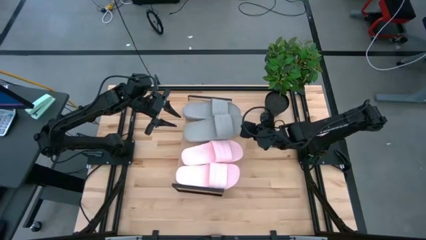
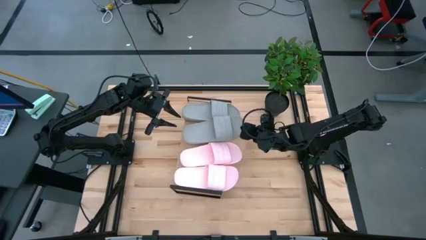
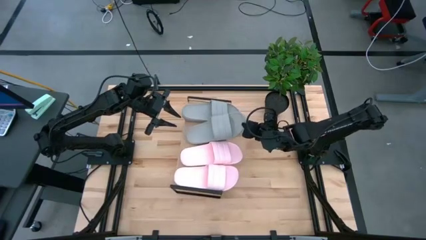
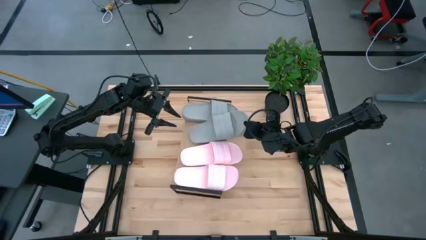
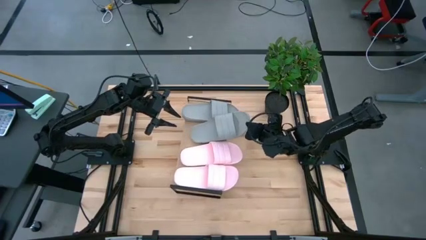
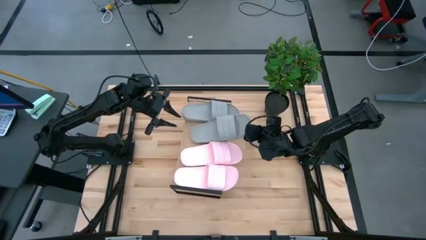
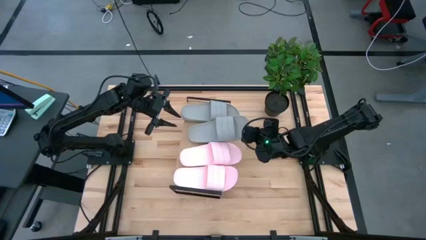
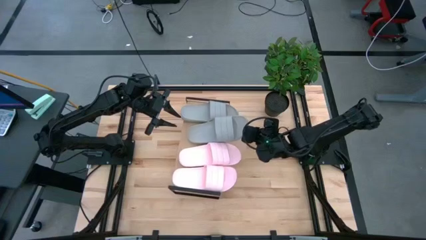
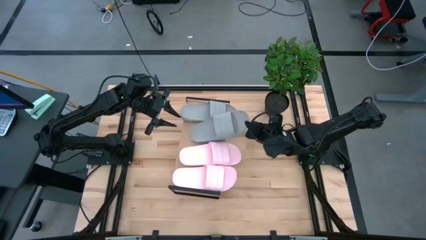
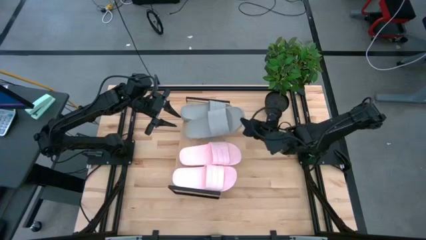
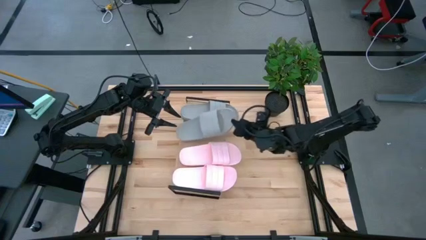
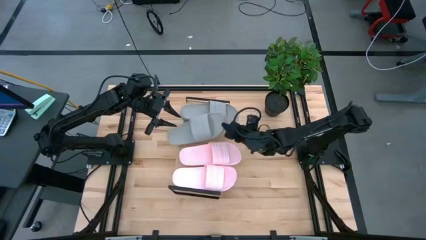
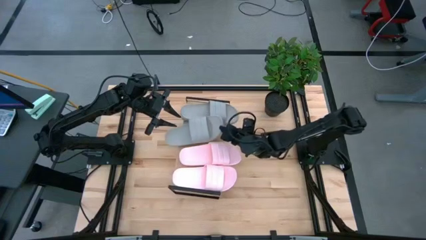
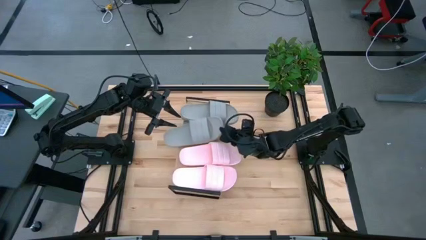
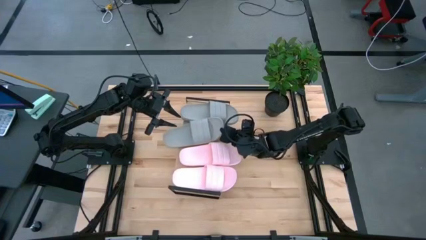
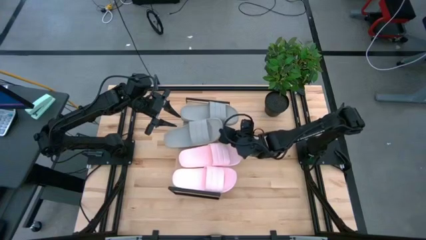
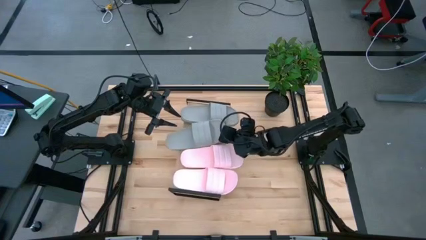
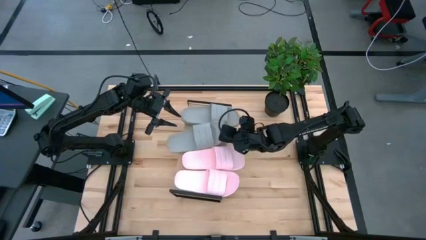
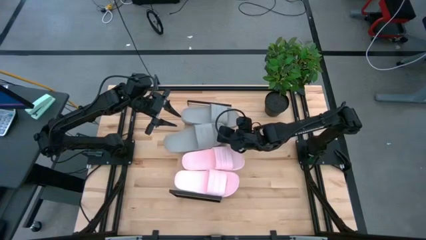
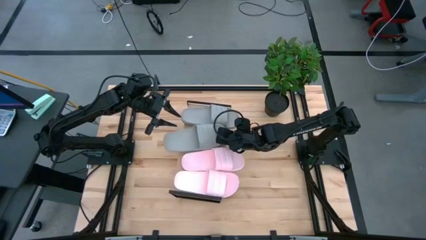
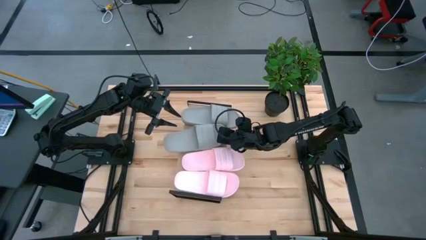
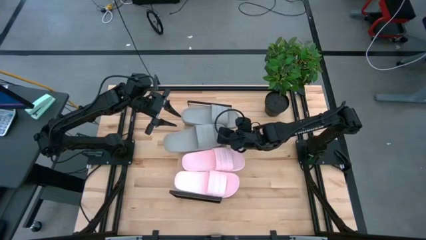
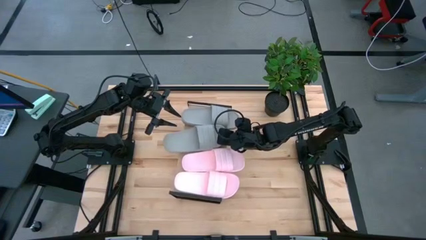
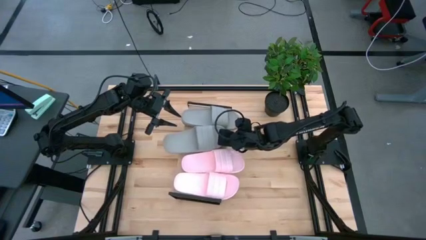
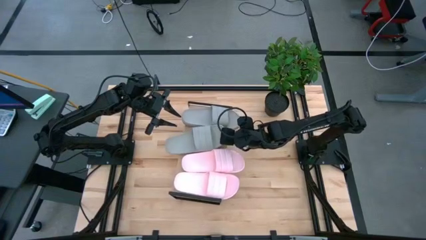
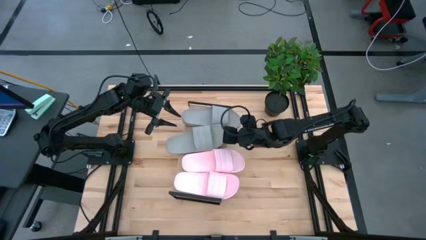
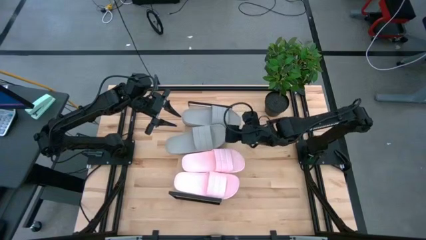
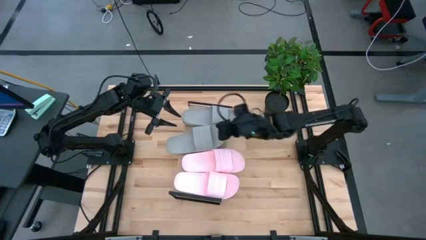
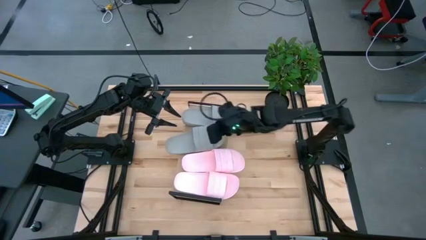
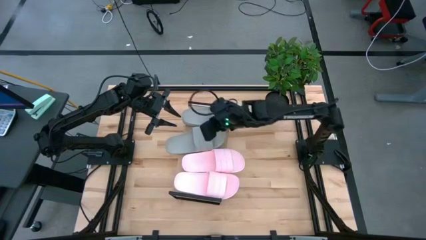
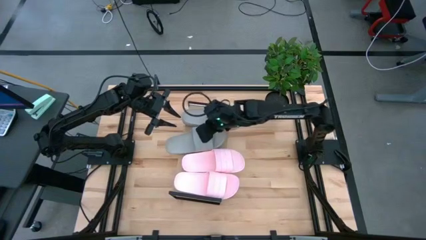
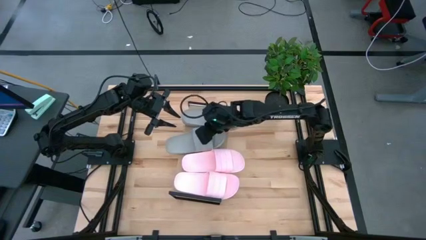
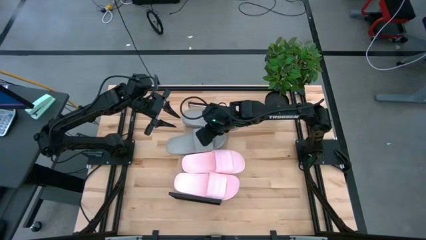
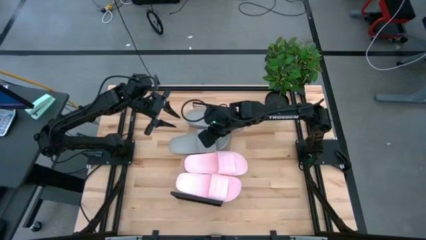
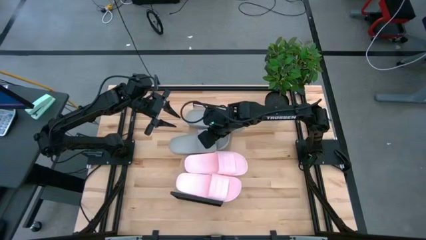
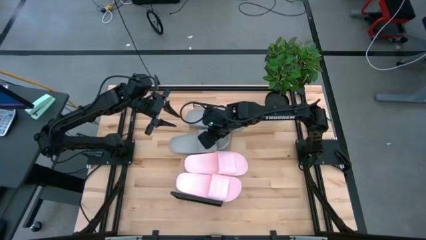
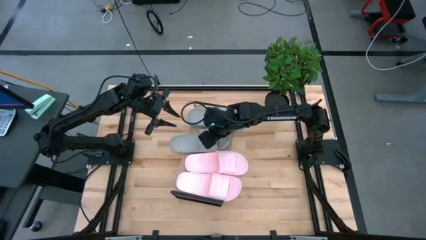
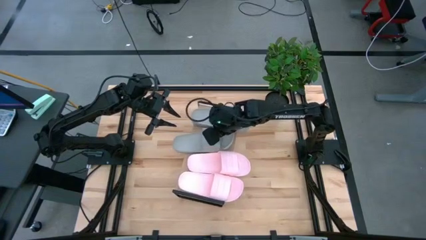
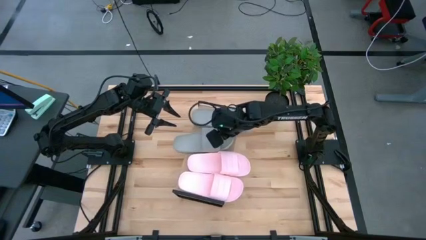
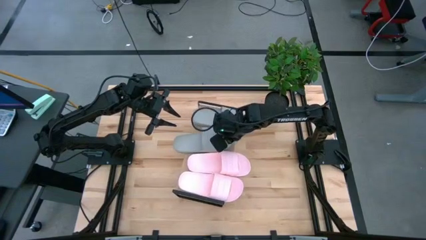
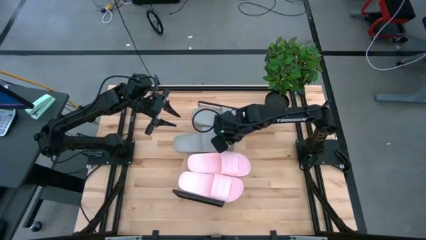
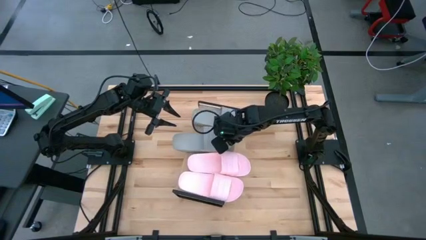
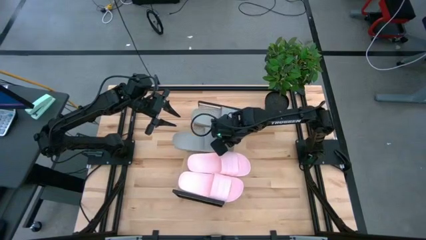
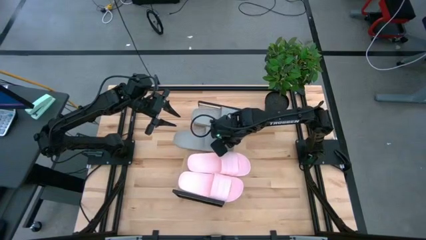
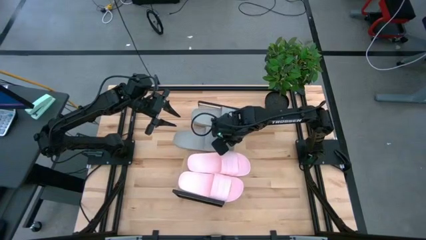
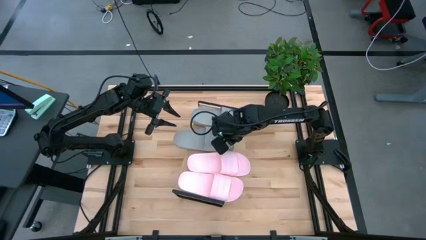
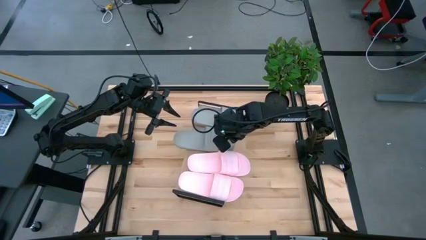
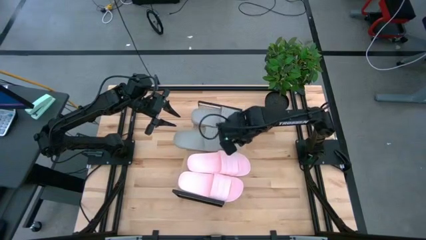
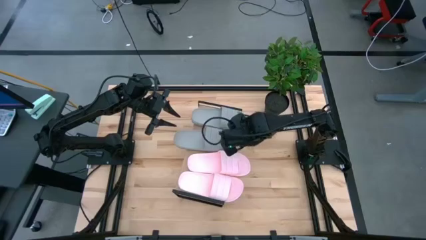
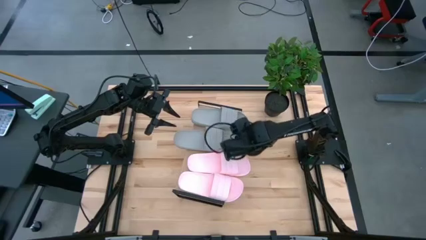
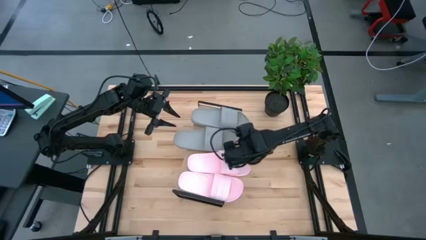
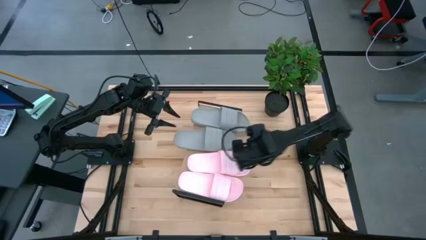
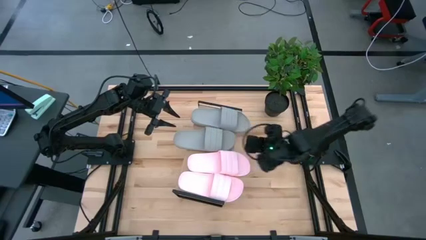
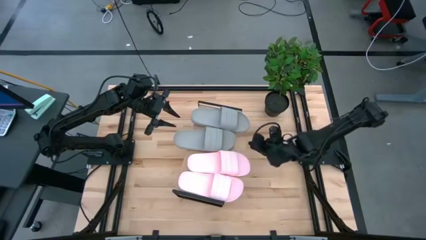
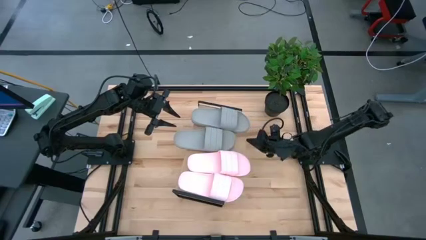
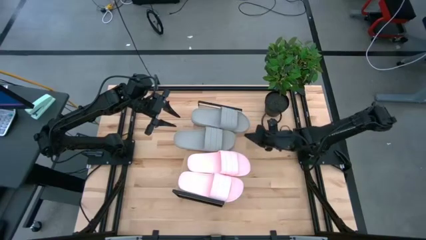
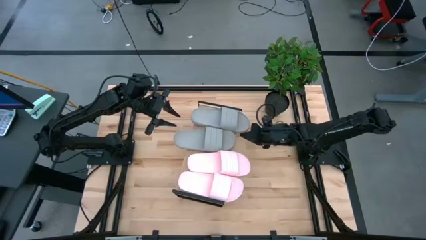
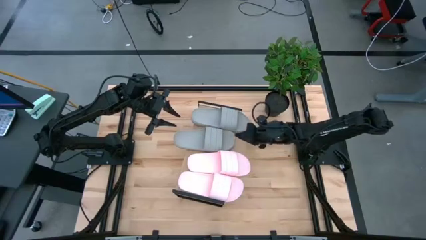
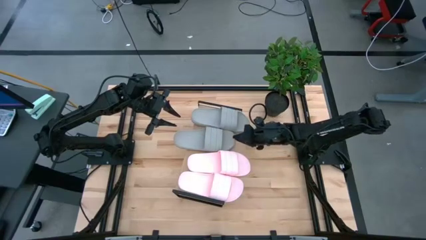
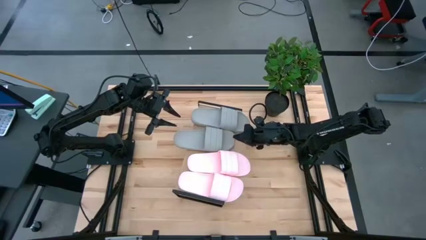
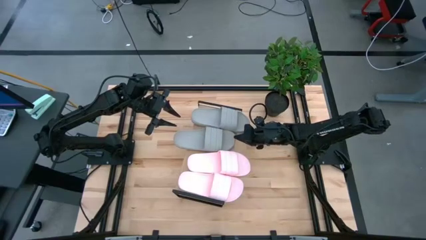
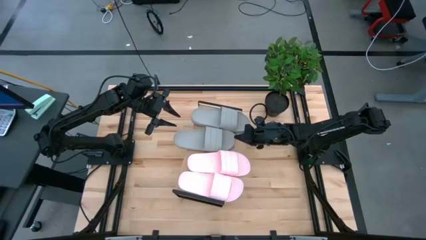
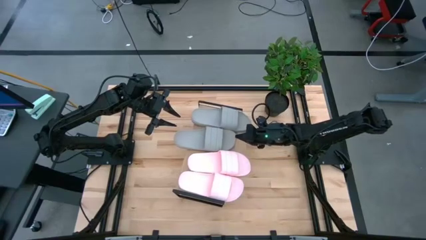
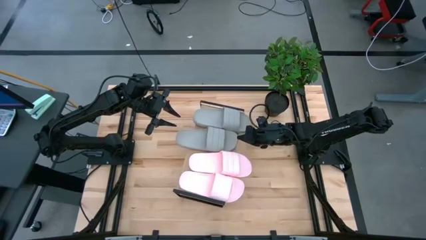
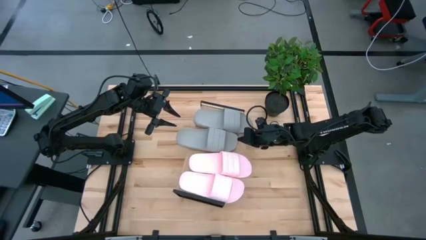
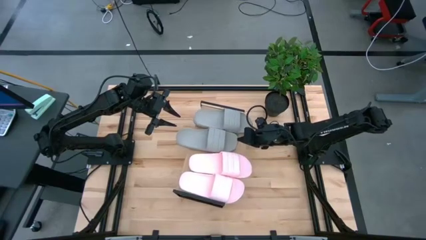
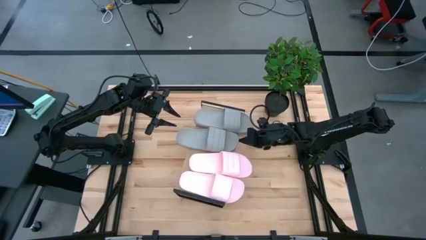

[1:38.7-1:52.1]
Task: Pick and place slides into the shelf
Adjust the gray slides on the shelf
